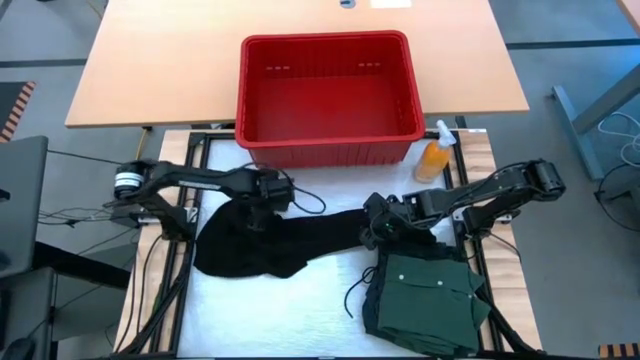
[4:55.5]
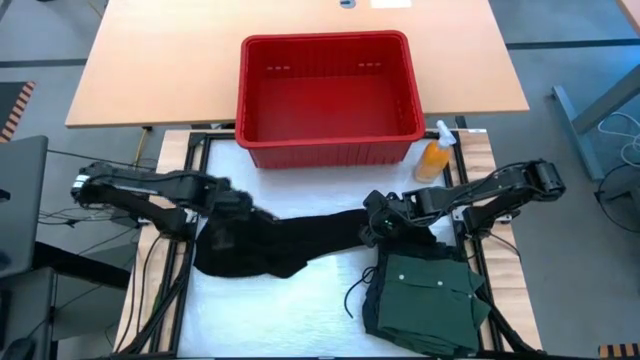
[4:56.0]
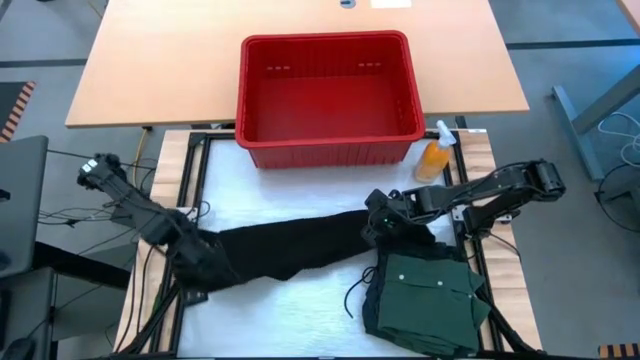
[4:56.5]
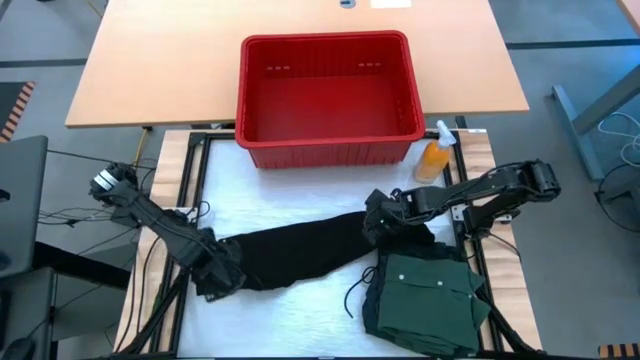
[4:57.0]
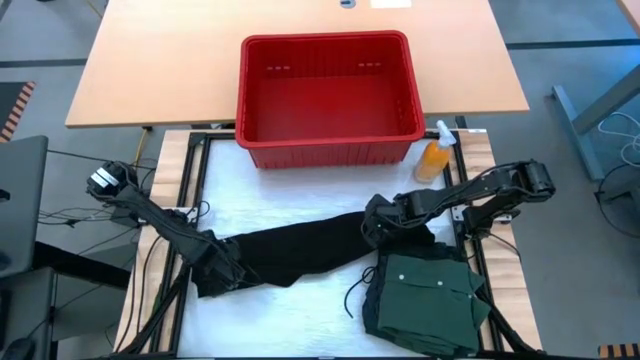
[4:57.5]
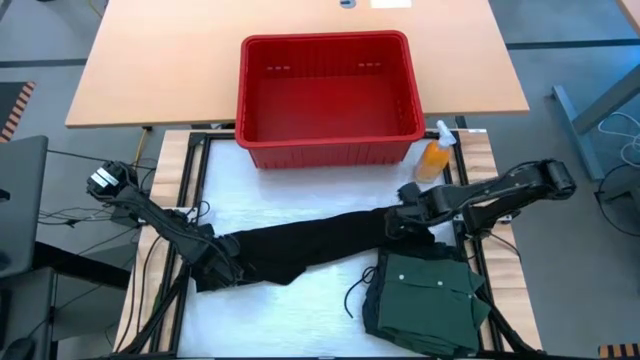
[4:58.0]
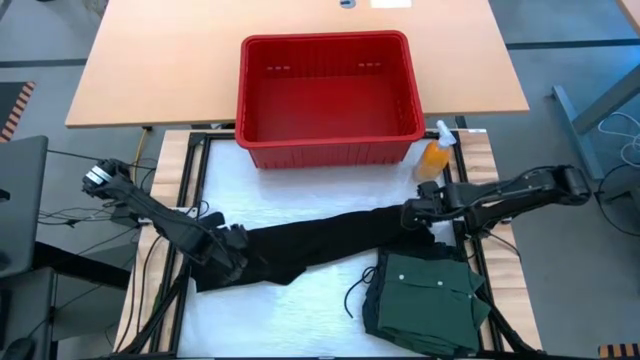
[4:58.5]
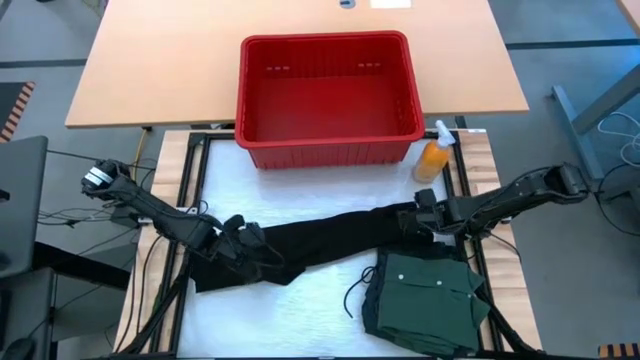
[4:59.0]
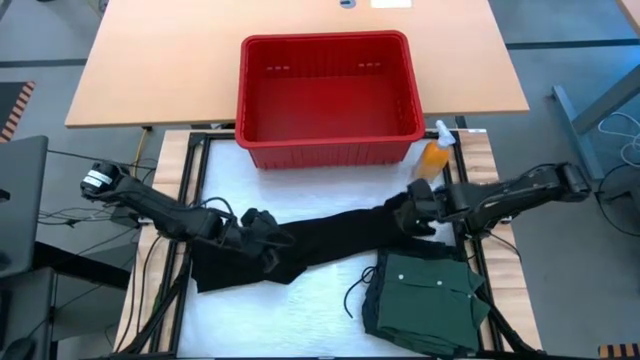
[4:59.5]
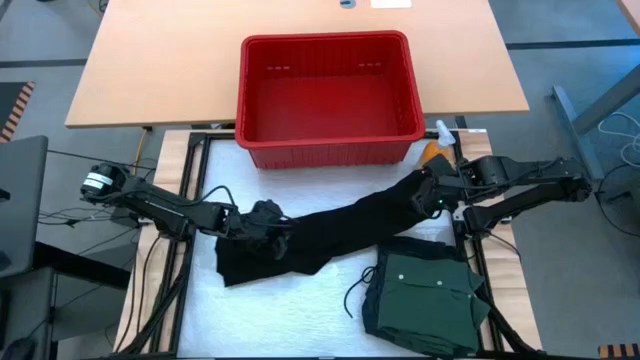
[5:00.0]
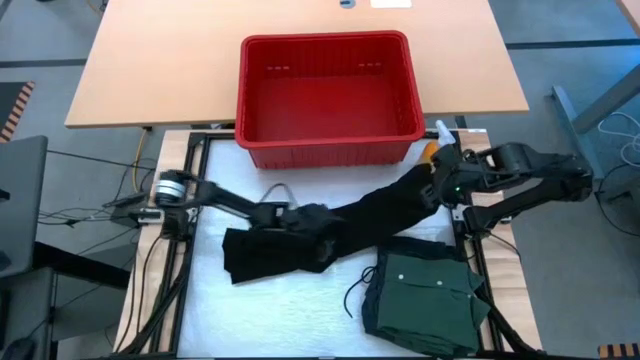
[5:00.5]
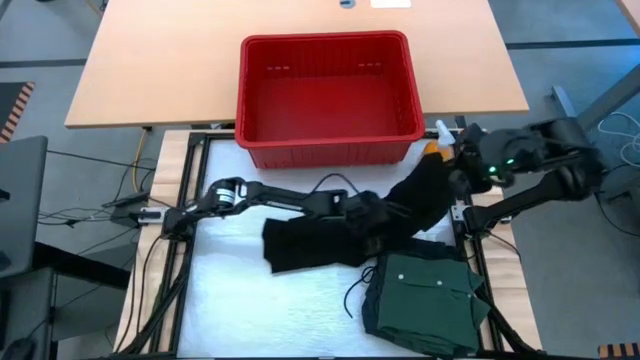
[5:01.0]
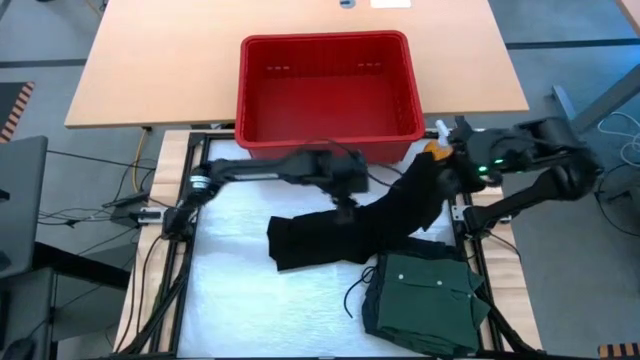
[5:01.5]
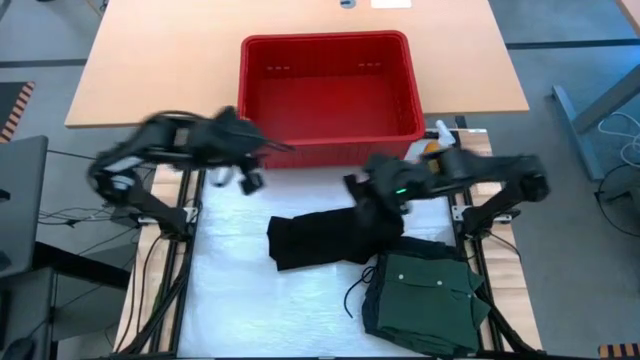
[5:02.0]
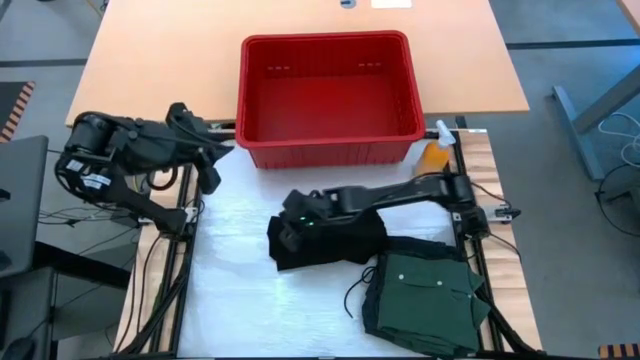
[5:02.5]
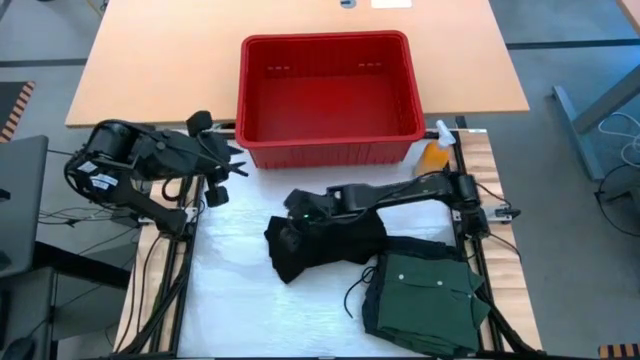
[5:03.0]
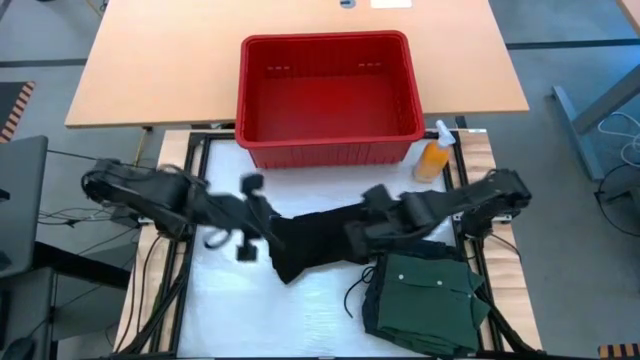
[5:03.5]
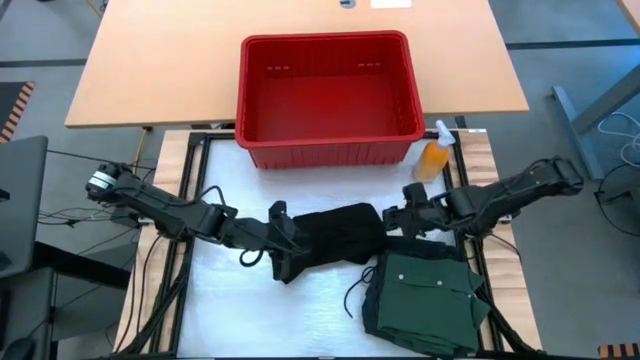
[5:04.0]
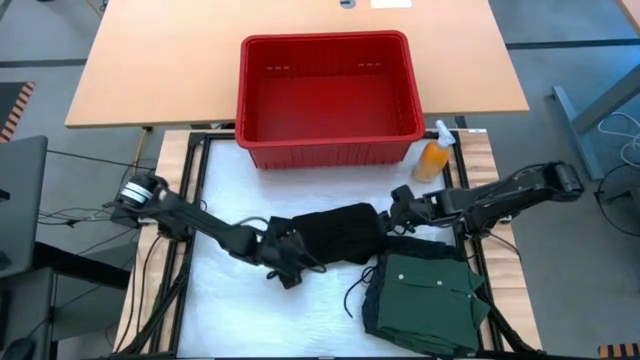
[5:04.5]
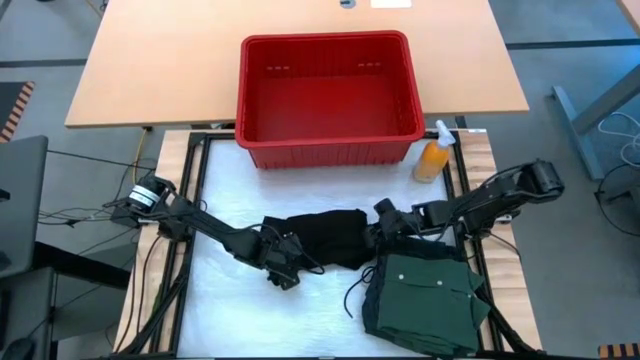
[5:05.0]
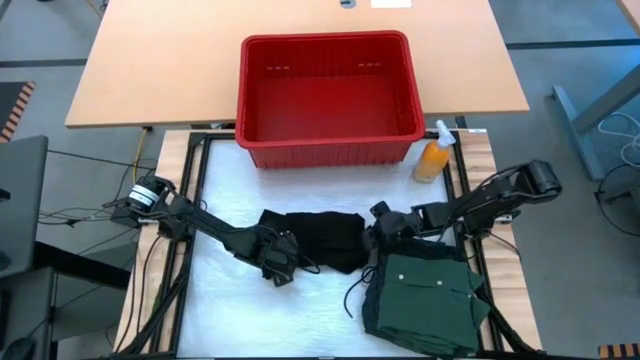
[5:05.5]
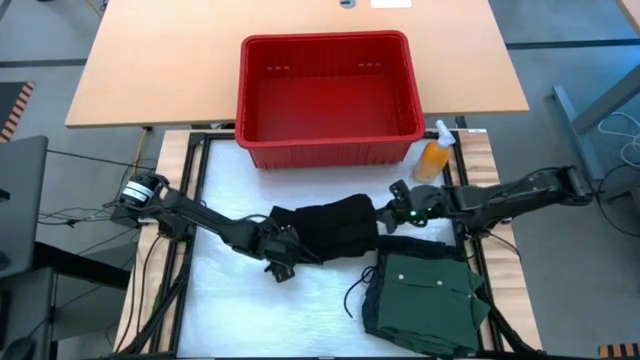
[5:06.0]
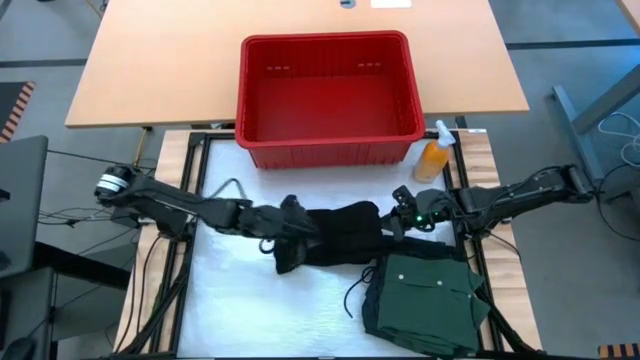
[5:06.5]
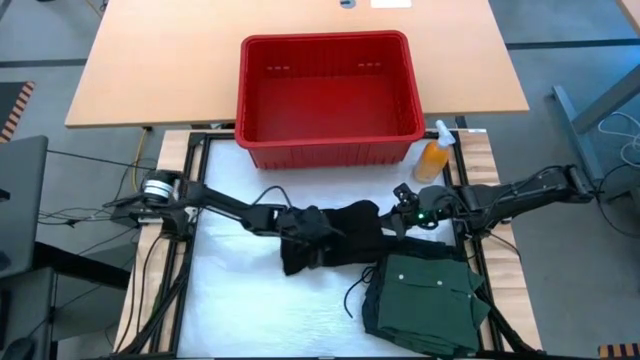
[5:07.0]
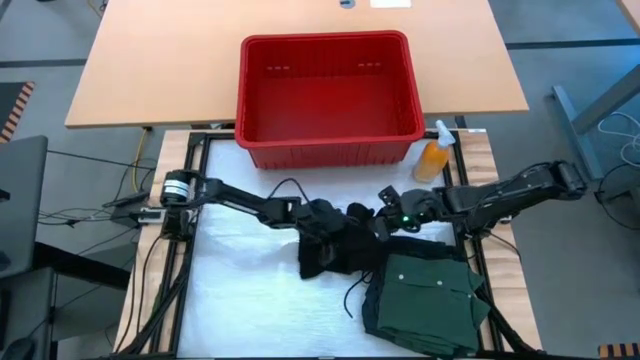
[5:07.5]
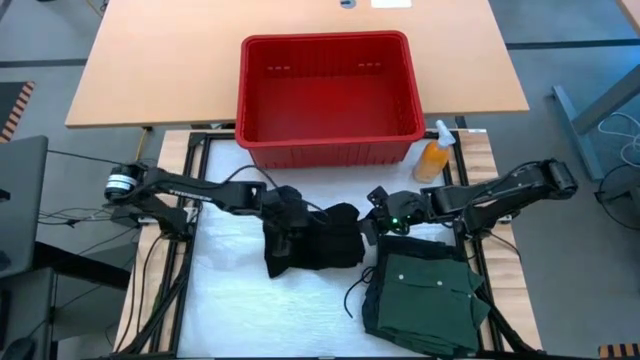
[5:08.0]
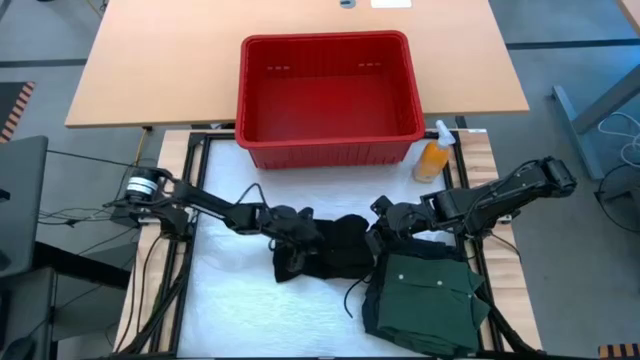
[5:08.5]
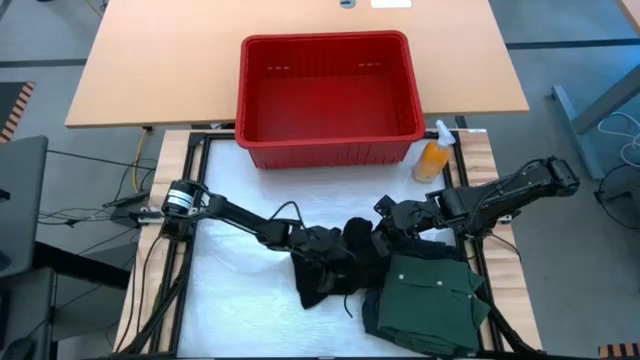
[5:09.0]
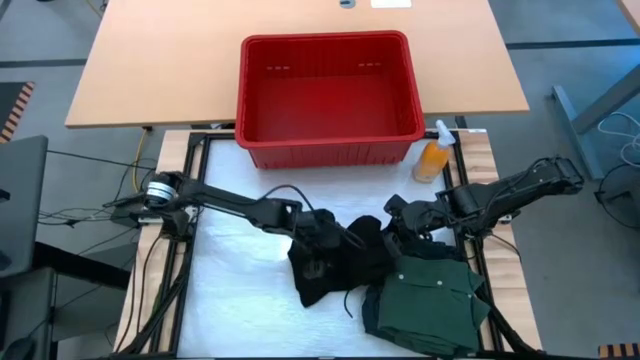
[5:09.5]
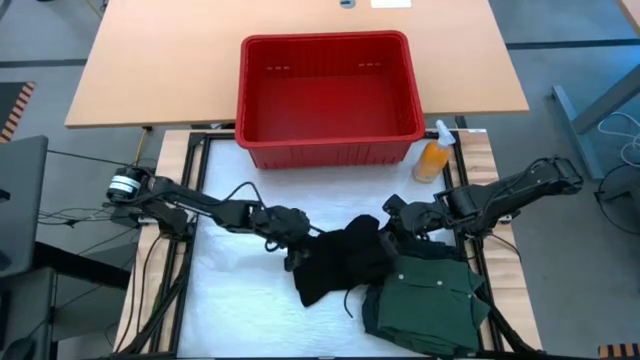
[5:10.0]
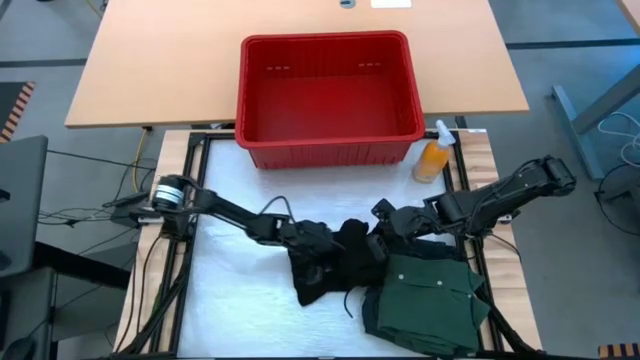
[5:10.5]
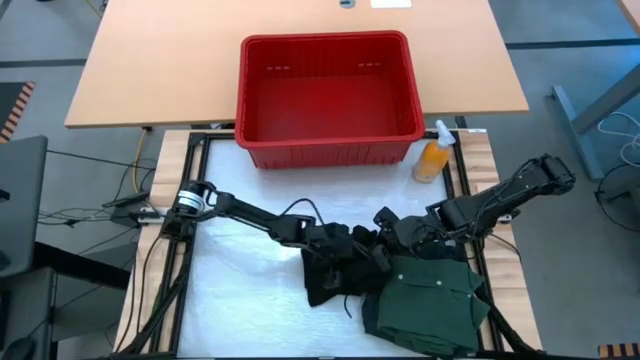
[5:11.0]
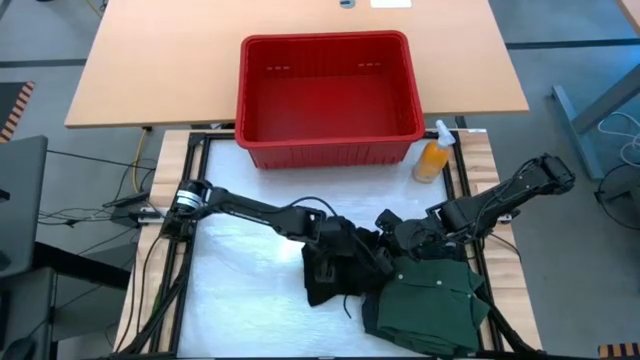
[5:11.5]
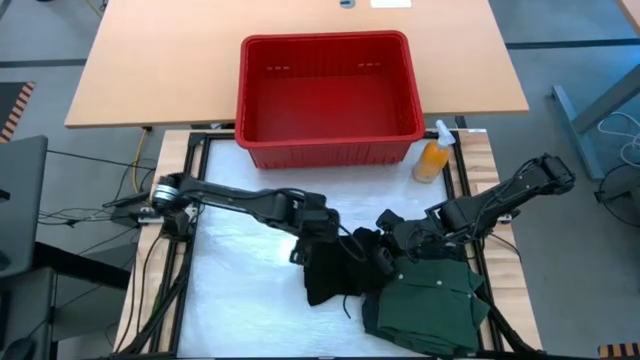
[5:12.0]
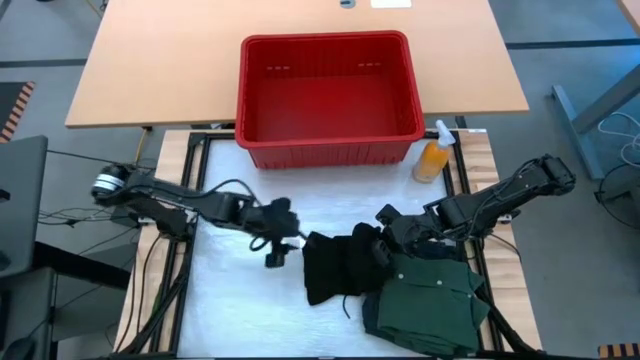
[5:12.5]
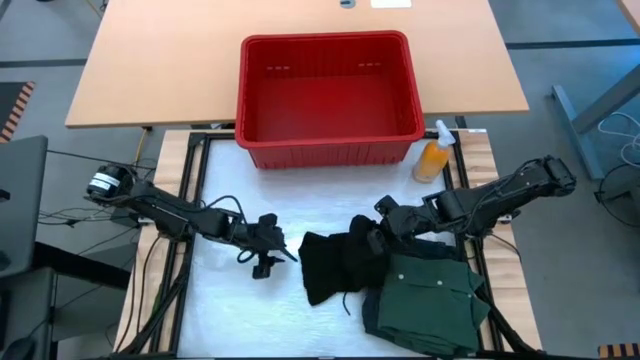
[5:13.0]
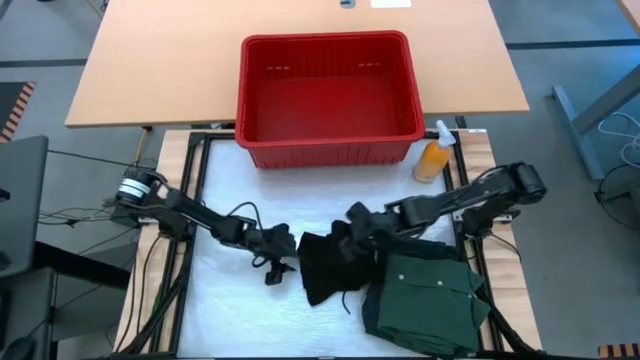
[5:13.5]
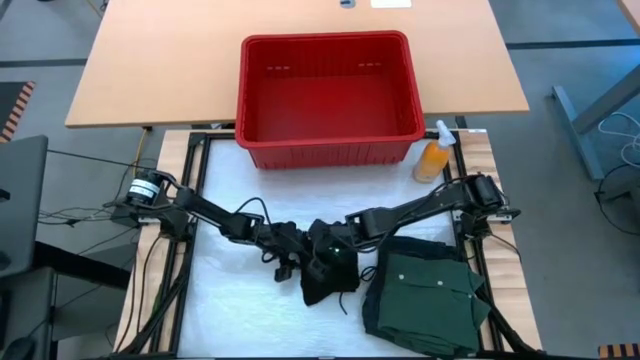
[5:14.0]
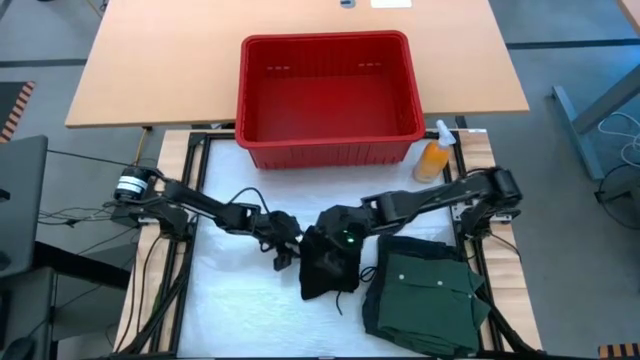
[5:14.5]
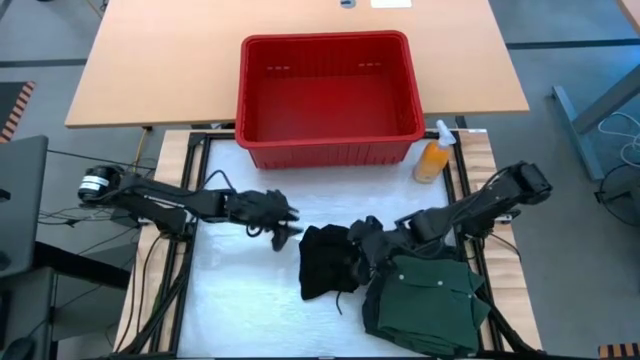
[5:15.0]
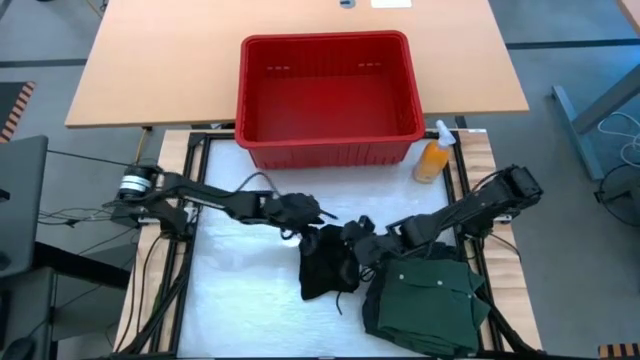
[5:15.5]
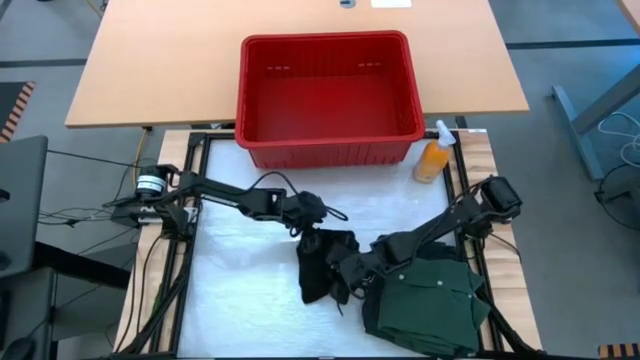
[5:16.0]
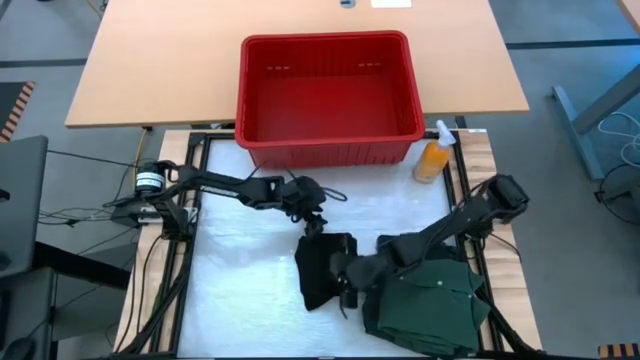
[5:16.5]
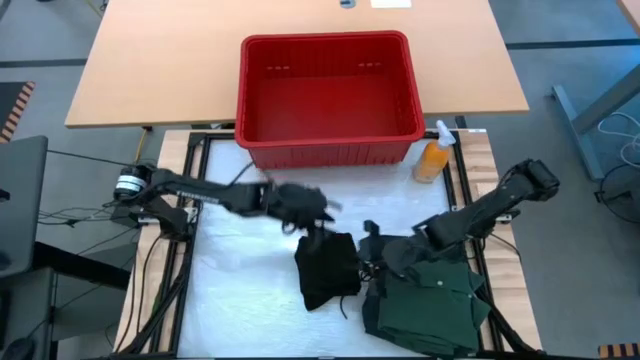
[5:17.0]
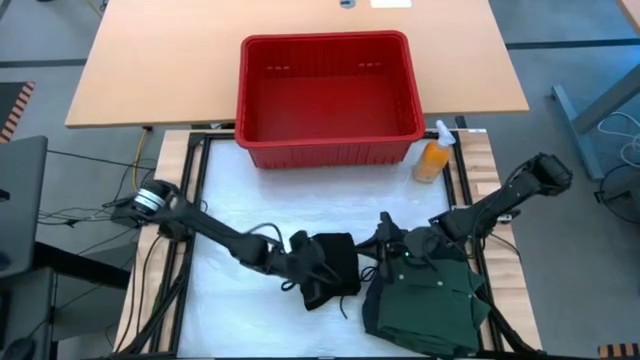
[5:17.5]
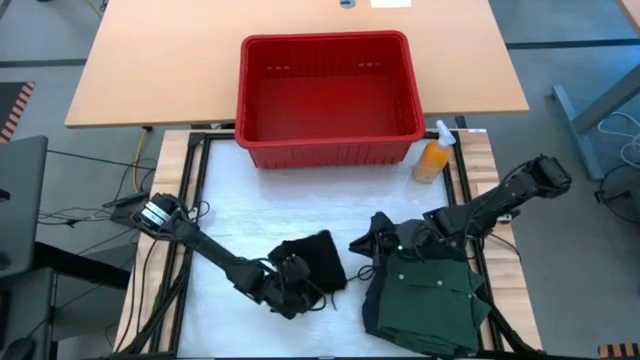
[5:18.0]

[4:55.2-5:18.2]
Task: Fold laundry
Fold the black shirt
